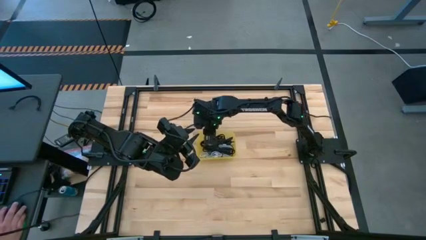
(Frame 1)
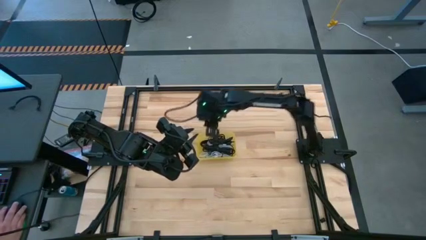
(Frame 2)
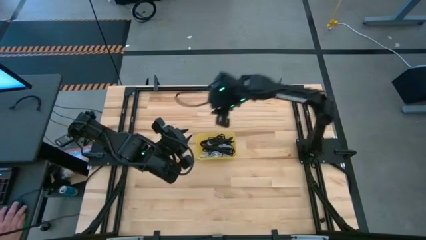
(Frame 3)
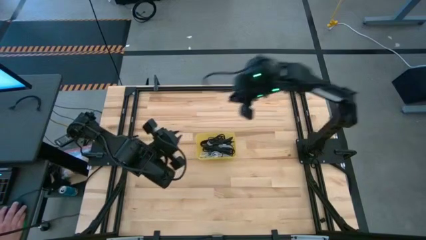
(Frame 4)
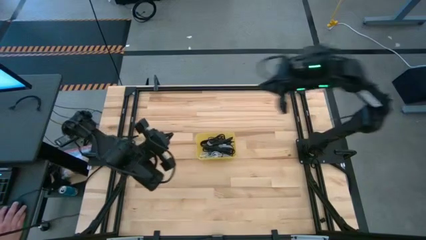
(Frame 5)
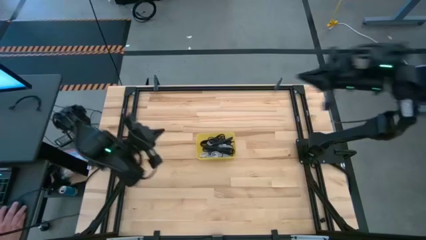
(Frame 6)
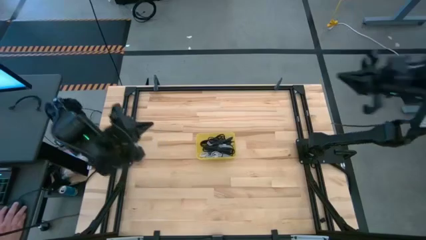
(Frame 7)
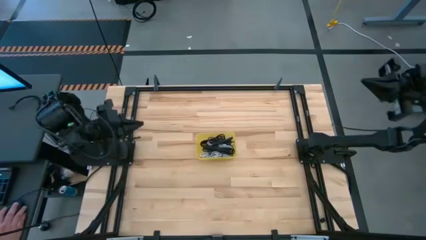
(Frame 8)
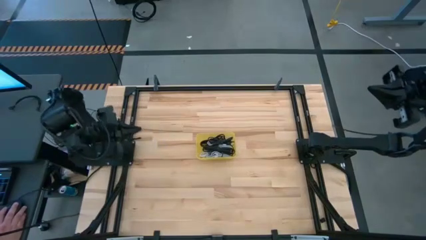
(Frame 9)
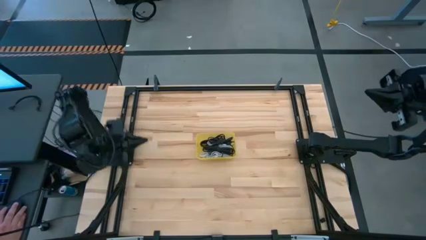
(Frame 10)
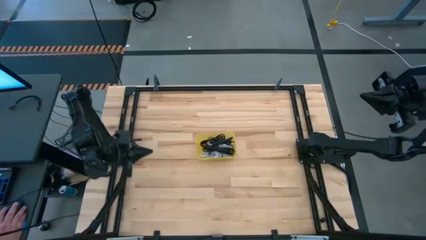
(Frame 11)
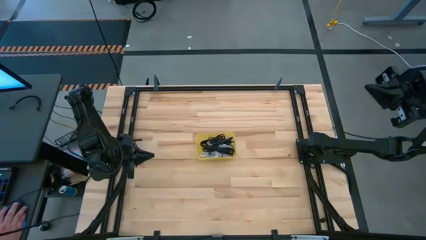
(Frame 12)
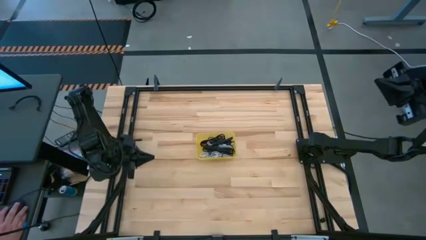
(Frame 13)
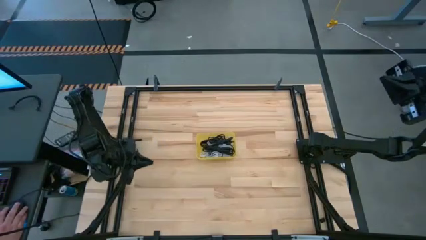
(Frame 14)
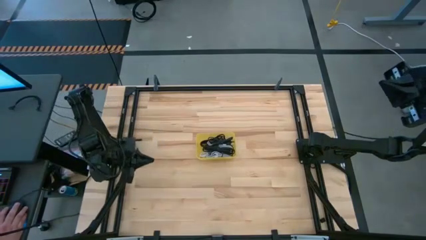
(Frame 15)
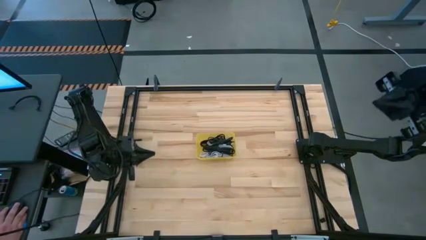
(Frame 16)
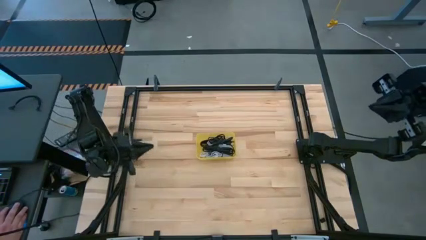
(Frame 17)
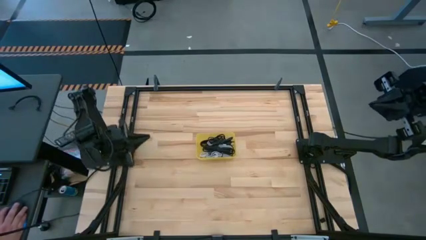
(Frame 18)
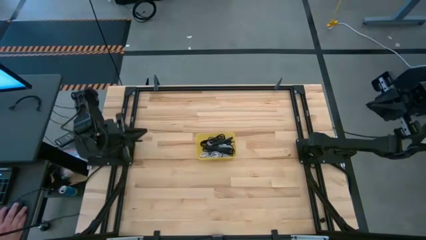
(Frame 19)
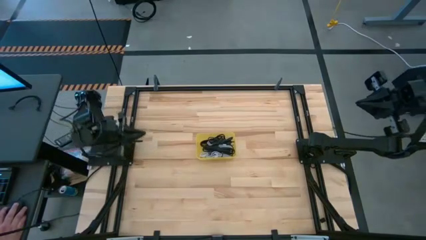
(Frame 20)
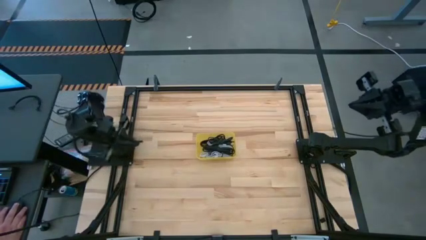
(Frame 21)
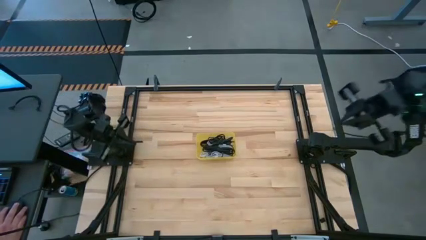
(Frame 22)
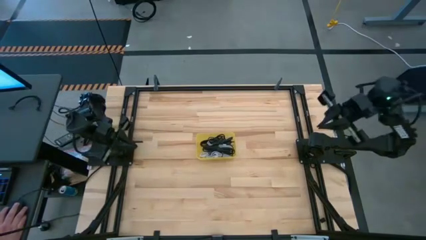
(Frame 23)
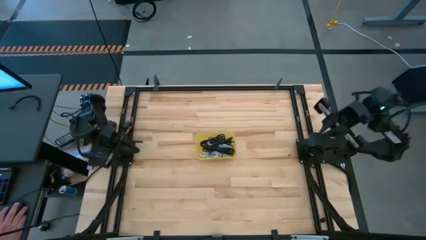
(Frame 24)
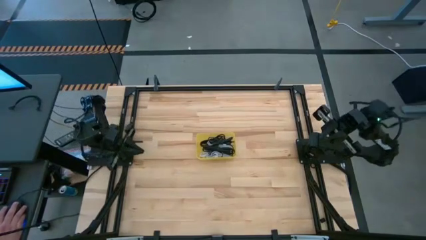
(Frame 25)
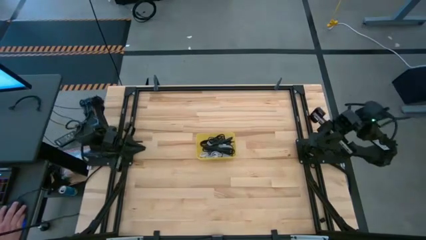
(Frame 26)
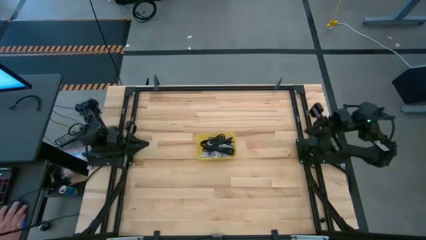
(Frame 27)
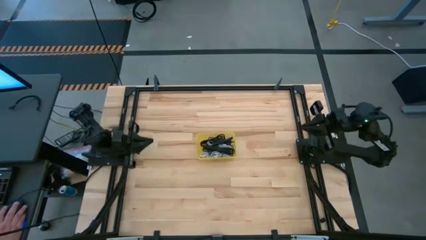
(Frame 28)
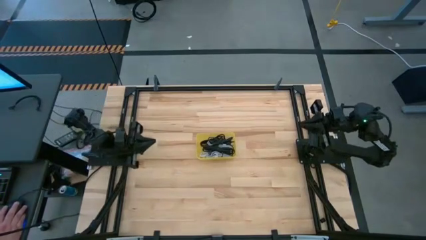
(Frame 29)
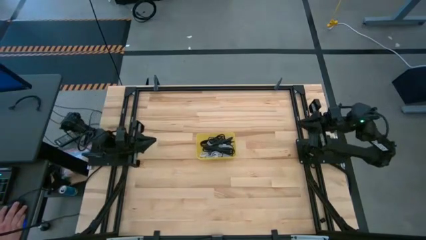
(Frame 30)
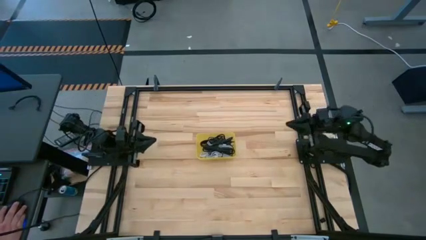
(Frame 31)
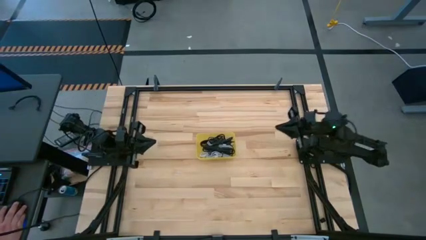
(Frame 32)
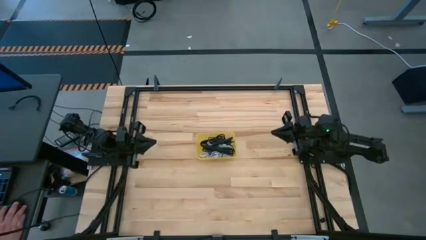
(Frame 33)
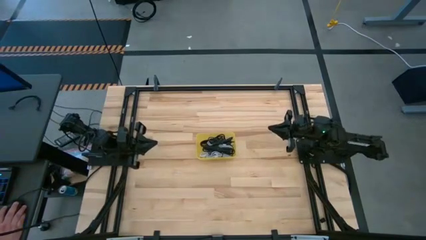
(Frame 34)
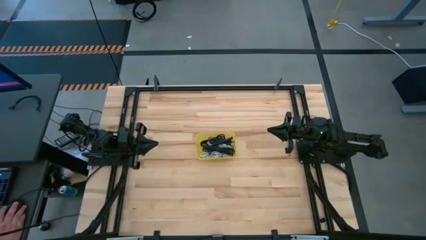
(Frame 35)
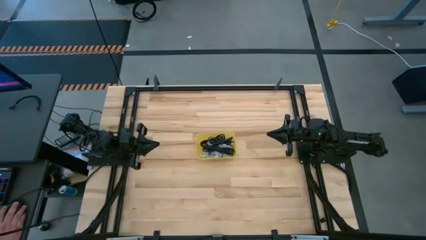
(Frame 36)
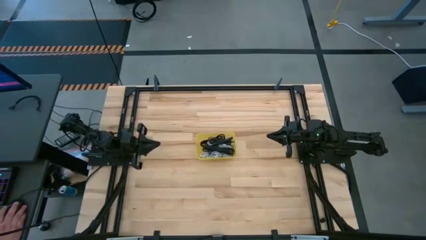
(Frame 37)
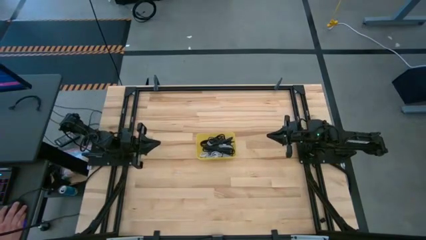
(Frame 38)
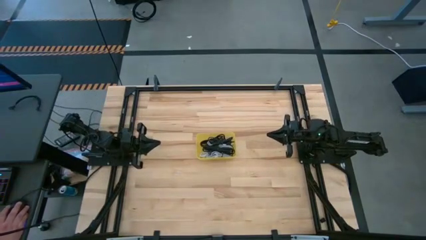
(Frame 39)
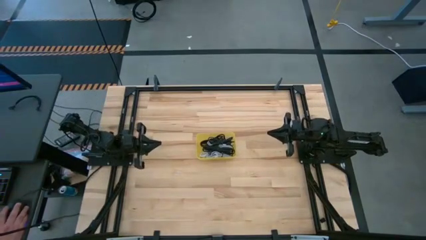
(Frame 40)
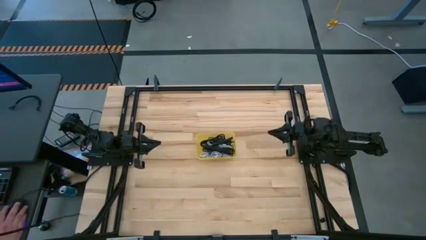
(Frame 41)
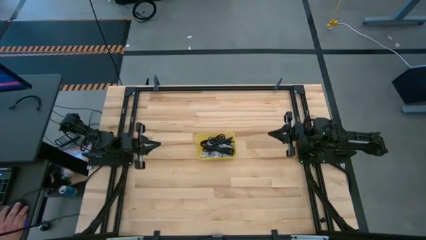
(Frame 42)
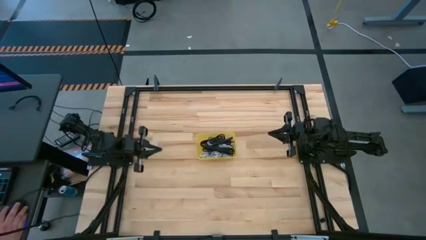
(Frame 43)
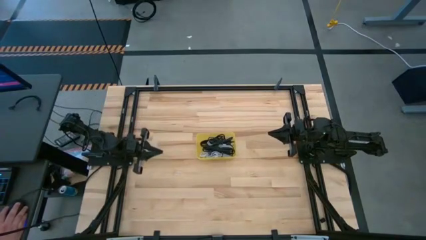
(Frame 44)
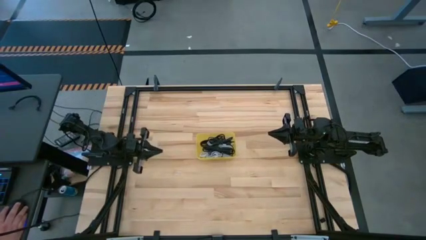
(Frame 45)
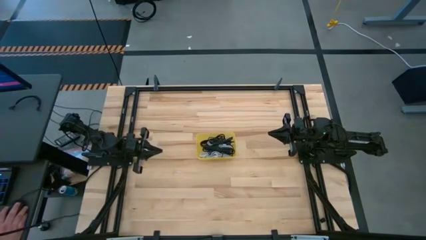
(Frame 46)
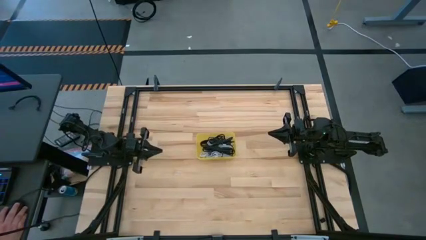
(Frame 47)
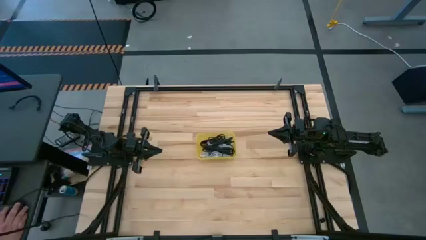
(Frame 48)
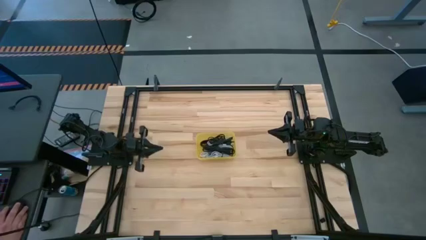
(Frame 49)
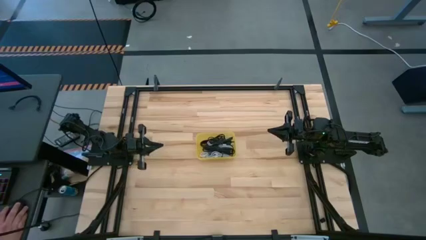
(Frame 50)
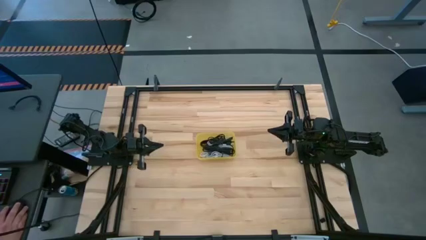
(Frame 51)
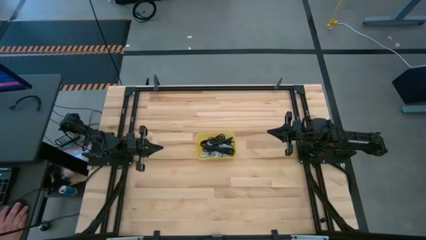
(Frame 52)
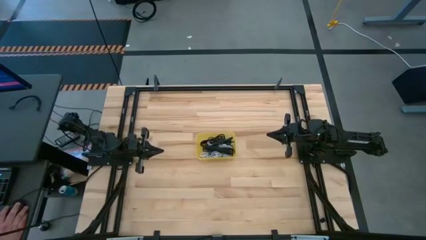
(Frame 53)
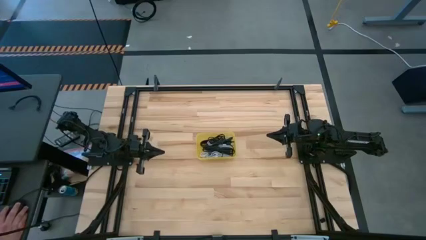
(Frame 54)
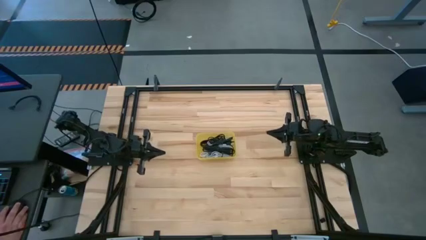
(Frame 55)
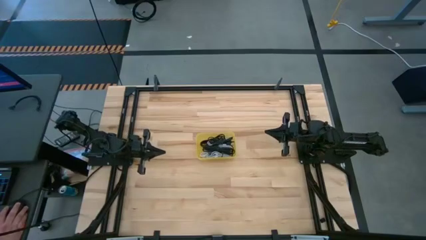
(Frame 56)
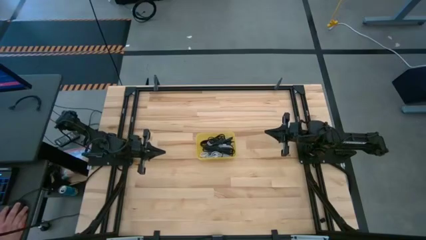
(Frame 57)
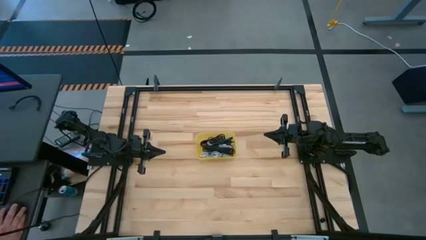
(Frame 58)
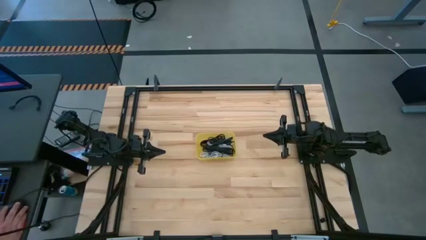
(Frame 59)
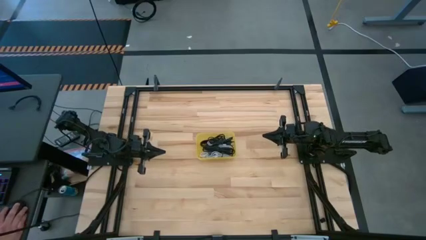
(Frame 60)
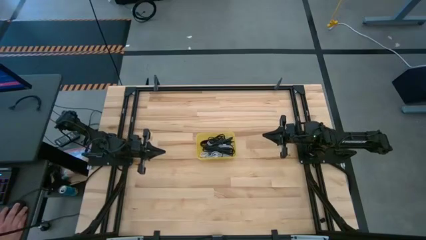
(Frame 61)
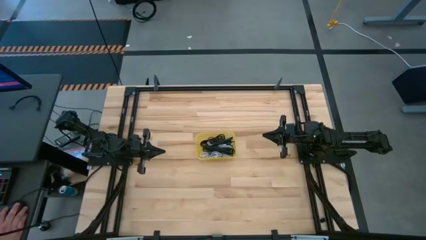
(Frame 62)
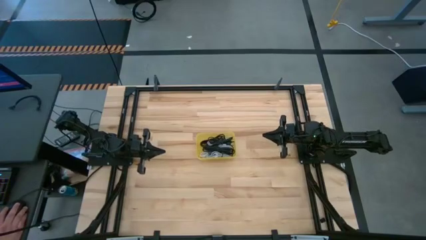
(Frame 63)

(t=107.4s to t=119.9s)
Task: Pick and place USB-C Cables
Return to Home Position

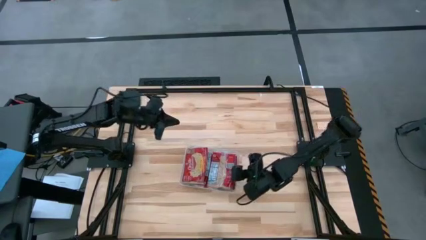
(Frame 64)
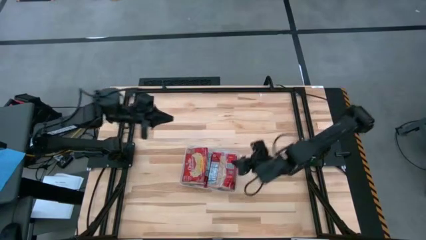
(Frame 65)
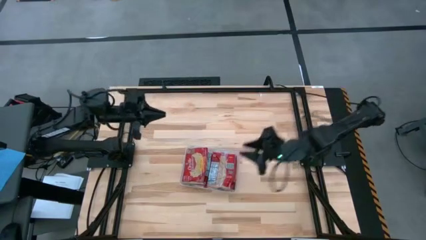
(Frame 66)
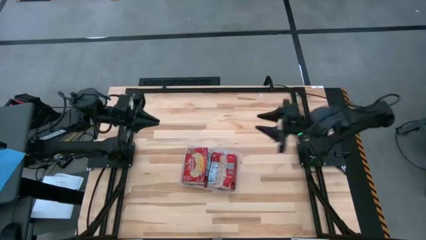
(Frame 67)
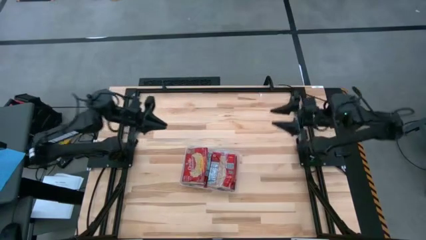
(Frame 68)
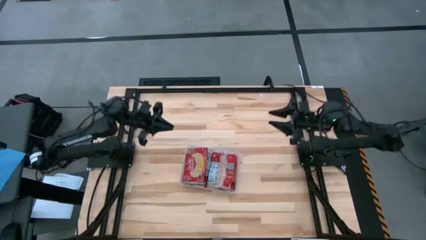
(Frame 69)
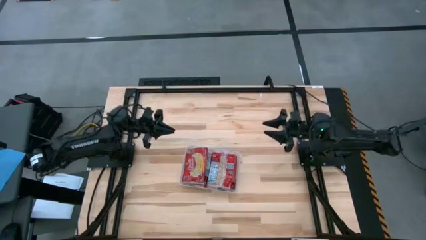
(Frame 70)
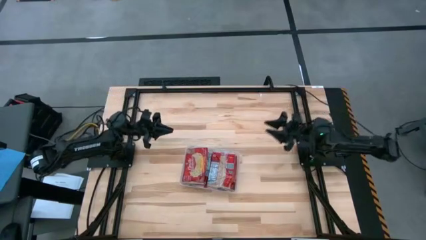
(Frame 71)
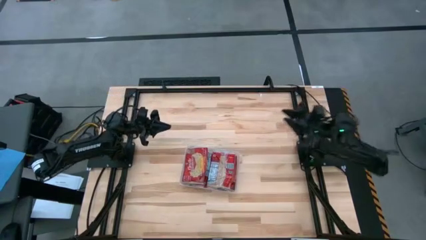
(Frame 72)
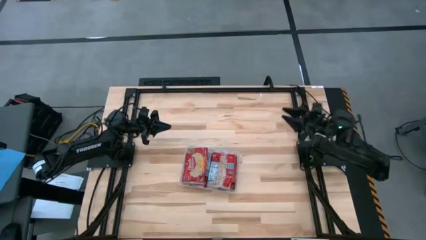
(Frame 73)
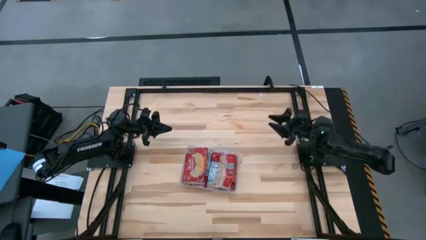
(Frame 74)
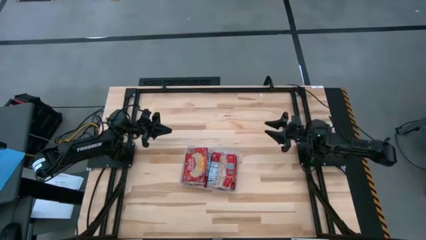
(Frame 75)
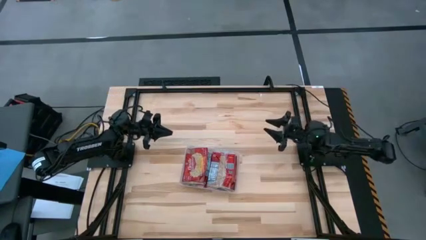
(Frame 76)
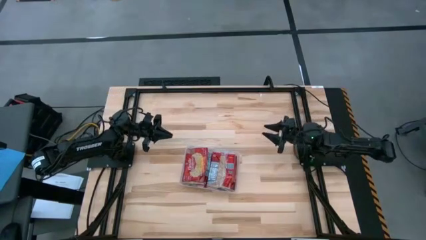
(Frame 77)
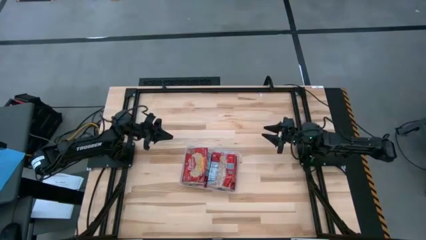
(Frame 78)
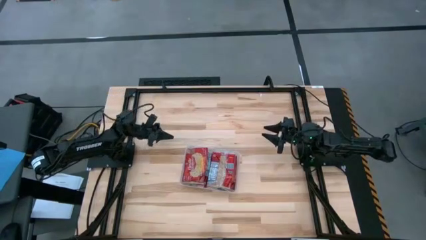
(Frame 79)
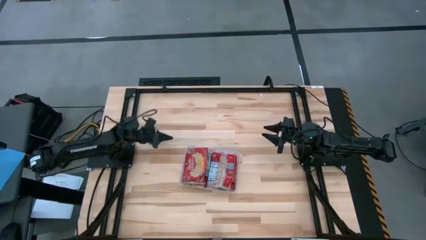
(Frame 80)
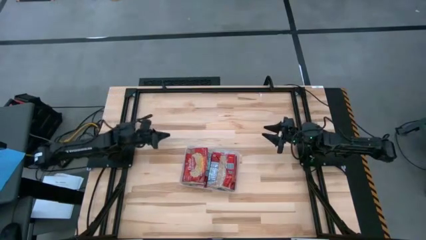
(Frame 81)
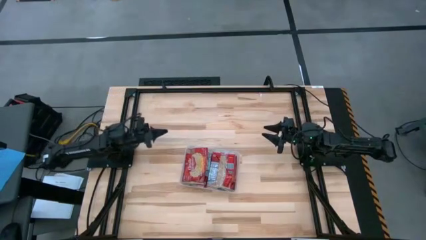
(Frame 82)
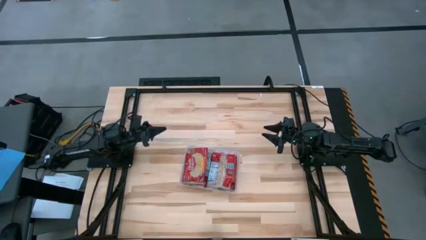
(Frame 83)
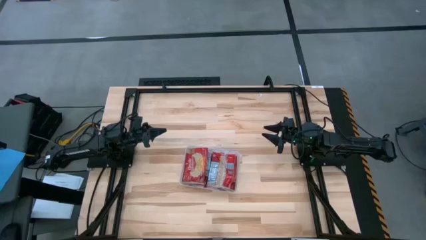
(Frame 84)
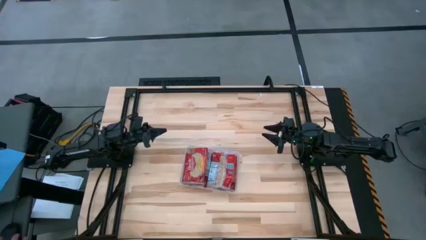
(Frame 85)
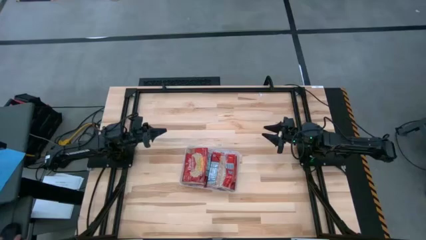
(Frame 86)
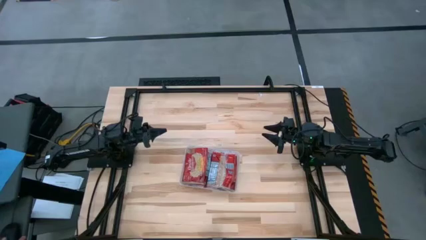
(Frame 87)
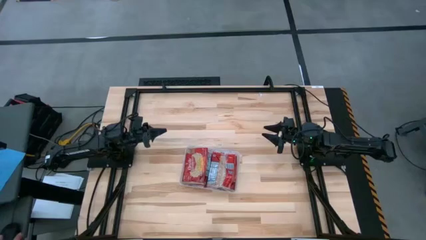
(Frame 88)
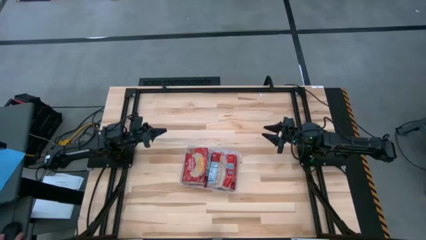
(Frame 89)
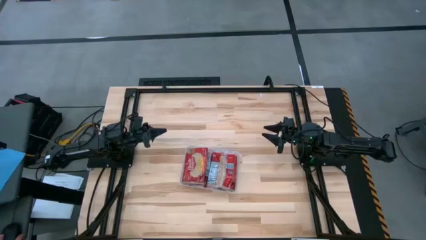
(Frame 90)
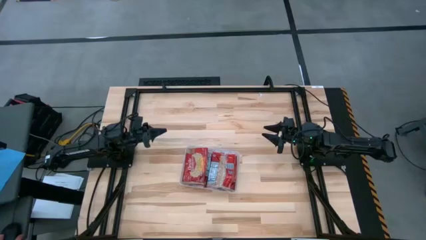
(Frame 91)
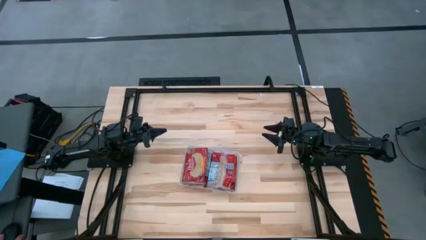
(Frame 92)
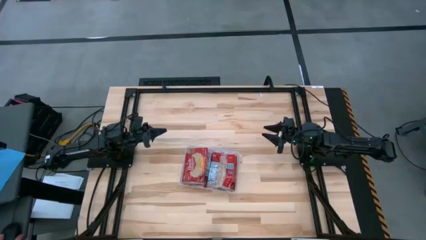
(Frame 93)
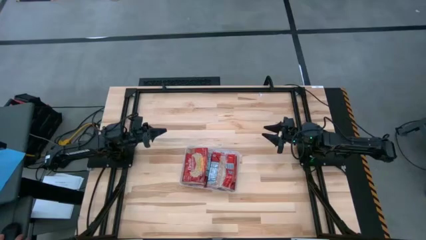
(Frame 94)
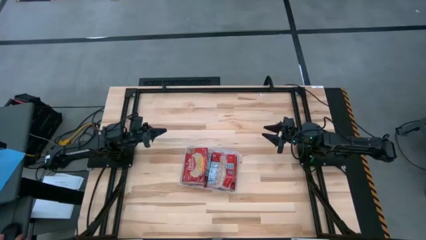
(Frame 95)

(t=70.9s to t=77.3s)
Task: Sort popcorn bags into baskets
Return to Home Position
